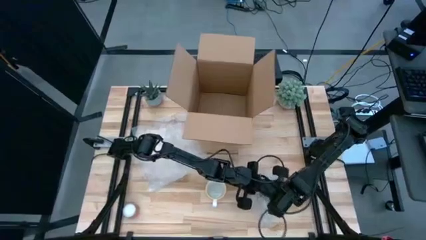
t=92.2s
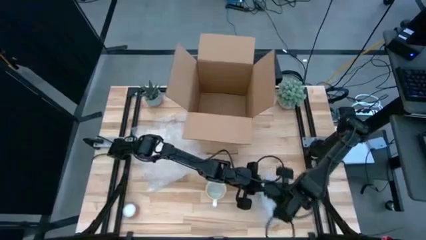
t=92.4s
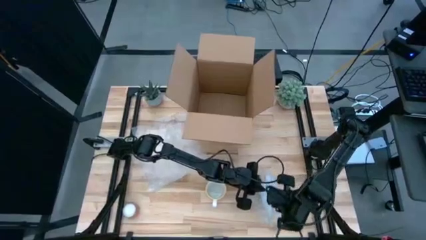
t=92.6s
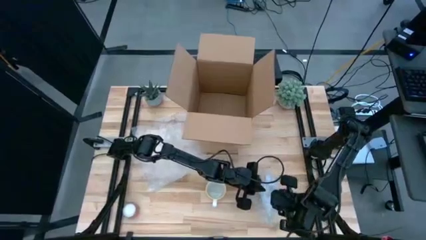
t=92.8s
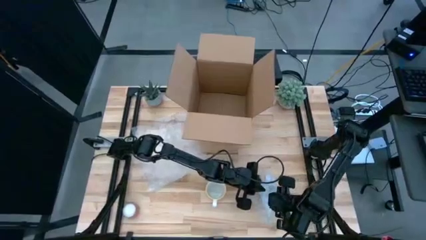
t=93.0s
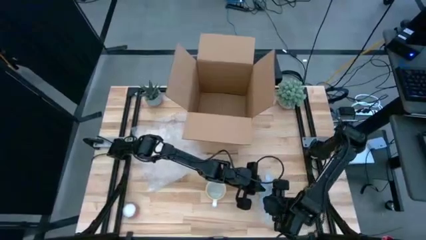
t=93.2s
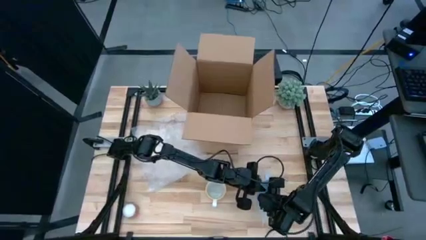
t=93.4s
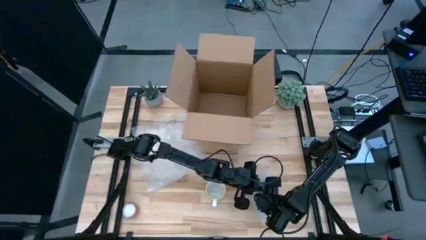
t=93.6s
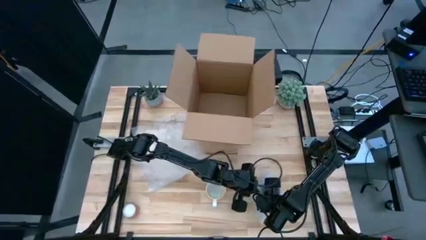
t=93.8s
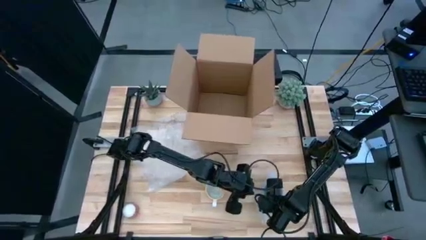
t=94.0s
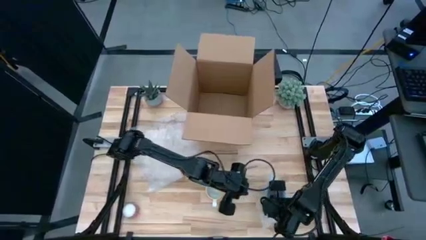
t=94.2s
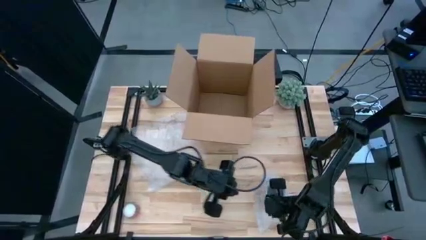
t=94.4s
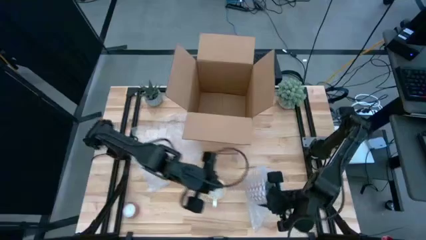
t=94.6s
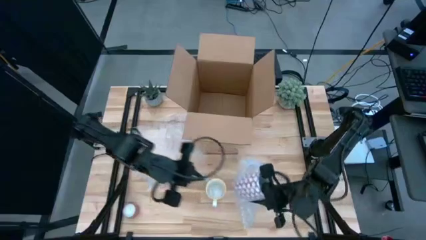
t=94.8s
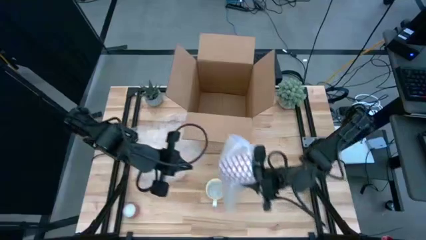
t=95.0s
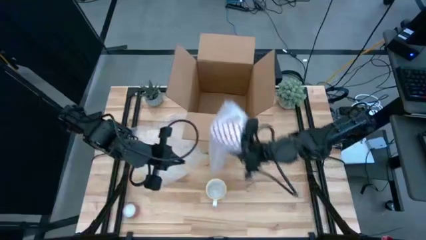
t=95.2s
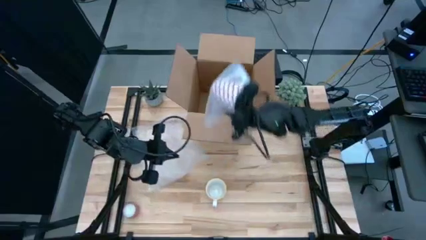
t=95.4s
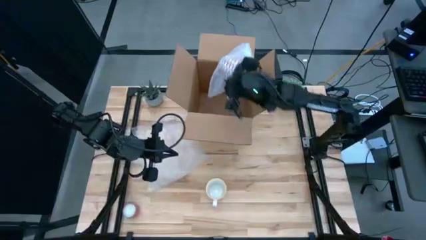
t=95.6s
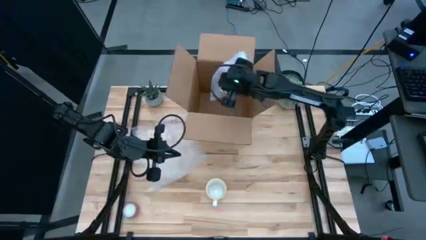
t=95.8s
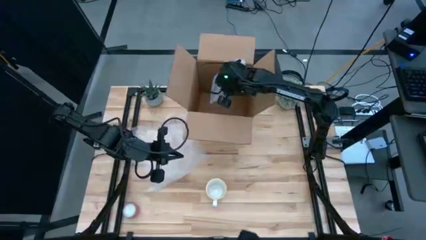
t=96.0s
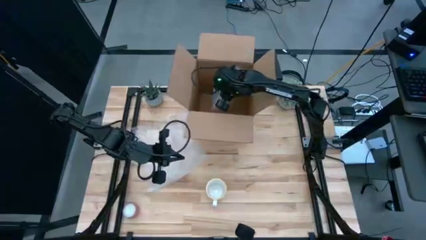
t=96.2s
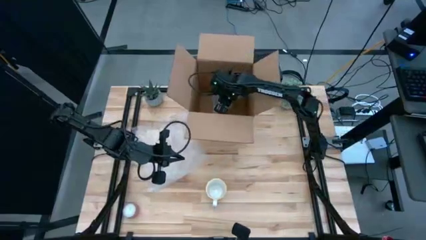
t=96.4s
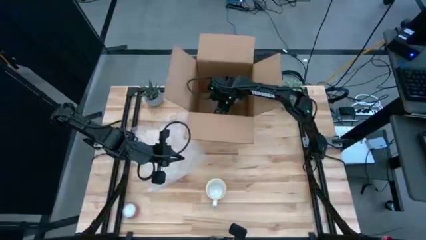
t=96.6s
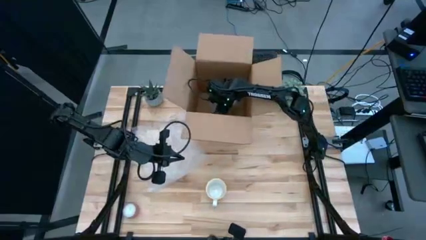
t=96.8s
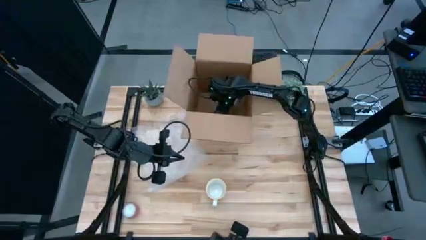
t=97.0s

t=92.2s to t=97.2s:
Task: wrap mug
Put the red wrapped cup into the box

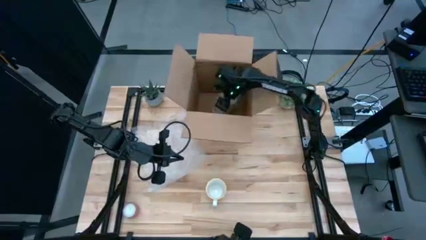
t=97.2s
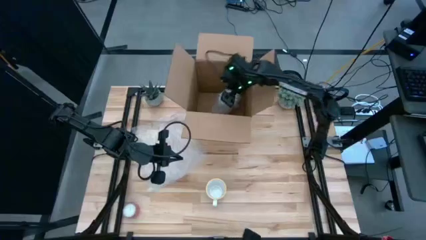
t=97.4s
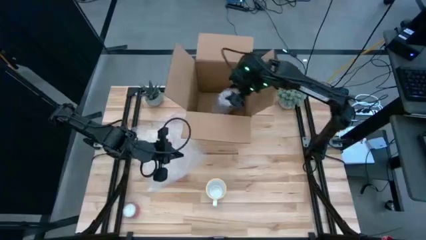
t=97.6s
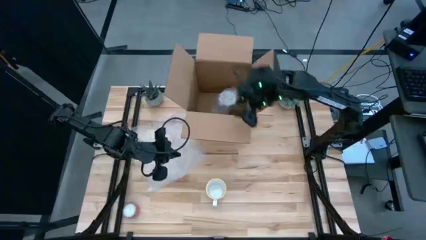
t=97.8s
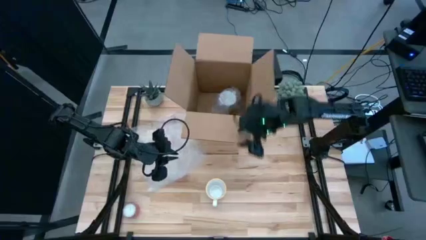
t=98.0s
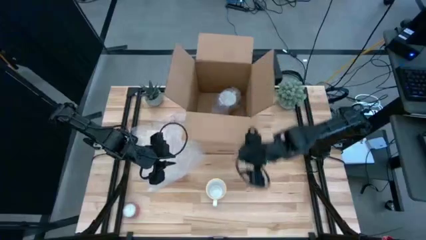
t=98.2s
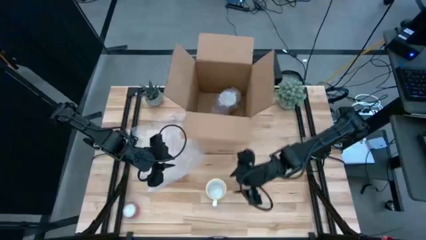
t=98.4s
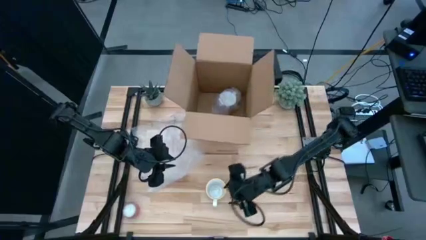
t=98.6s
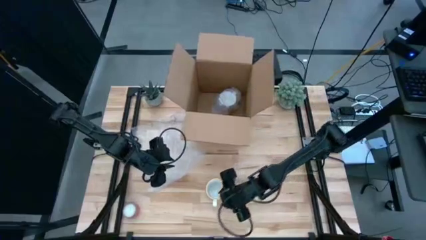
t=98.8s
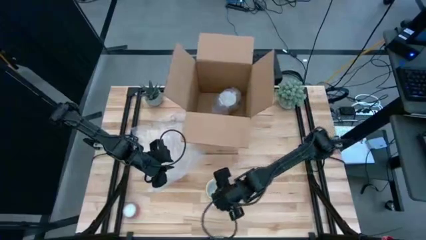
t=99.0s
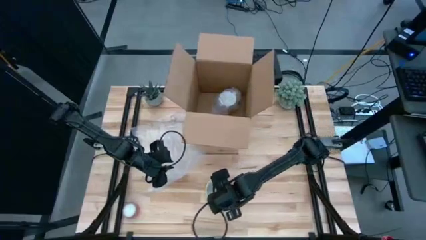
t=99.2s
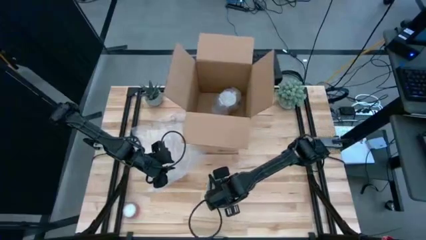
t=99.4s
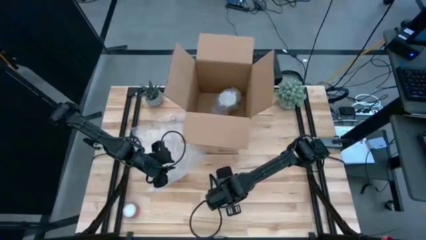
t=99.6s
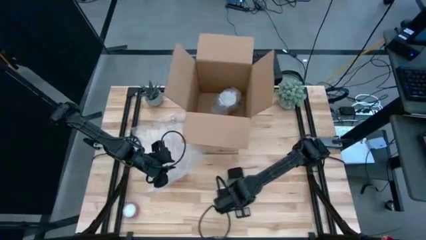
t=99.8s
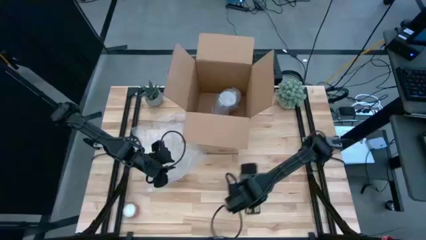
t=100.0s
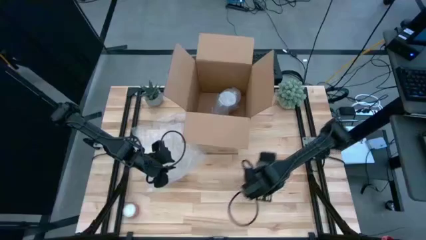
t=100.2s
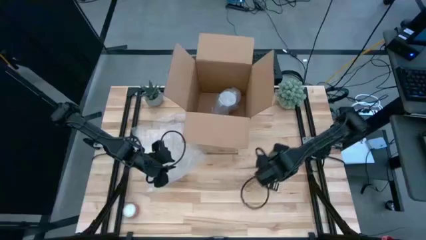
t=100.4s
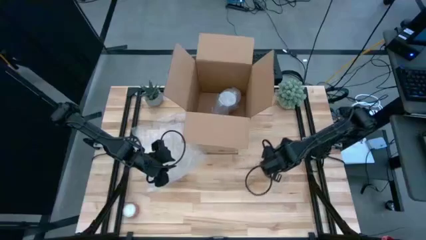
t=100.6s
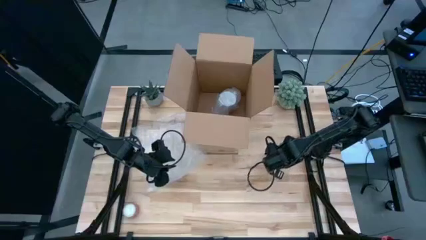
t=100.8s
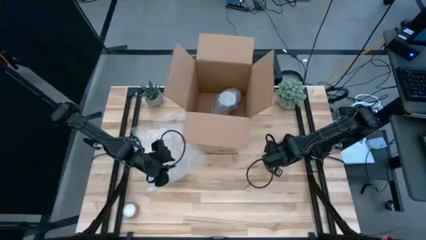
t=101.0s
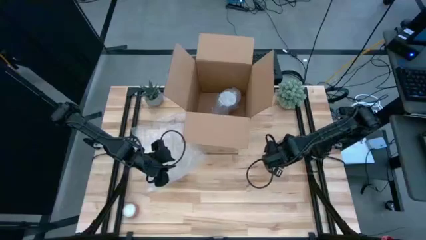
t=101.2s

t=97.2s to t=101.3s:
Move the cup to the middle right

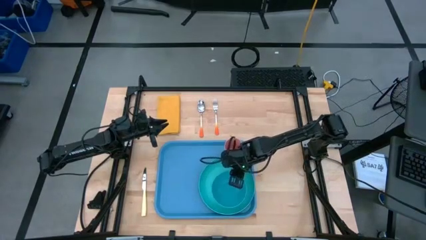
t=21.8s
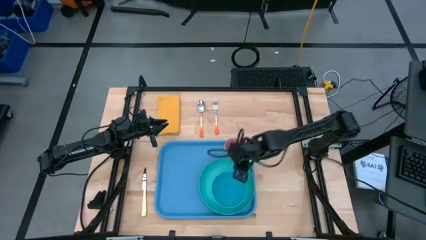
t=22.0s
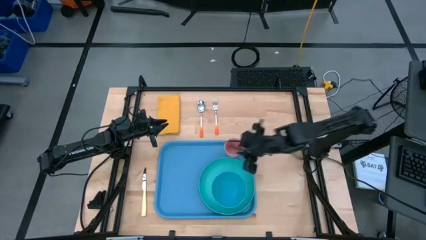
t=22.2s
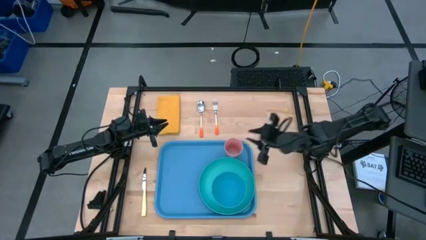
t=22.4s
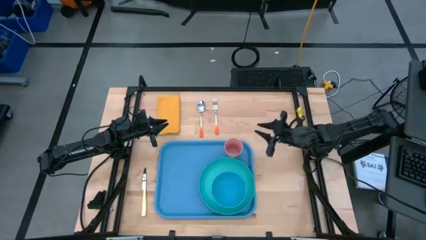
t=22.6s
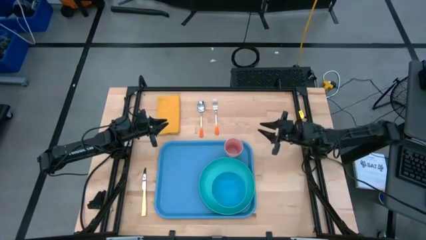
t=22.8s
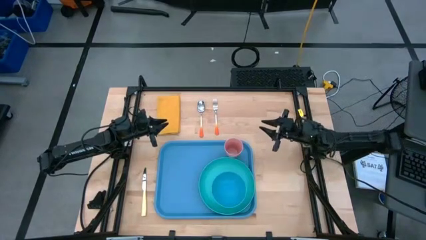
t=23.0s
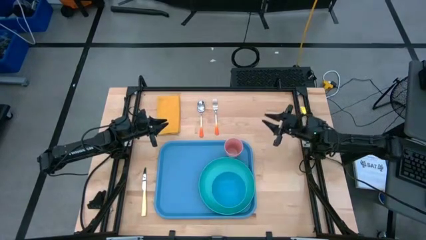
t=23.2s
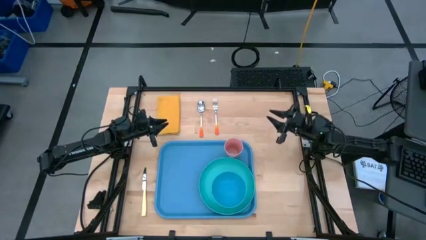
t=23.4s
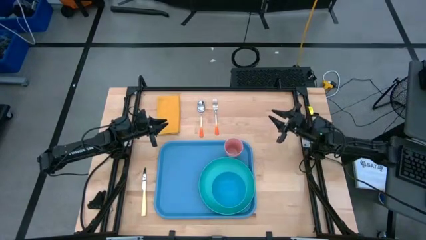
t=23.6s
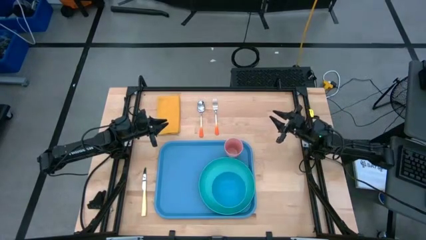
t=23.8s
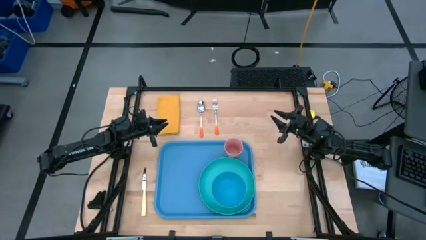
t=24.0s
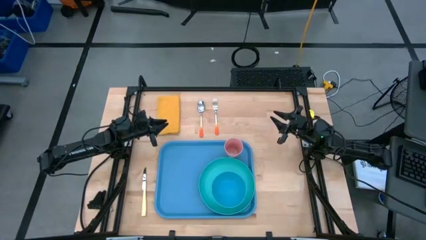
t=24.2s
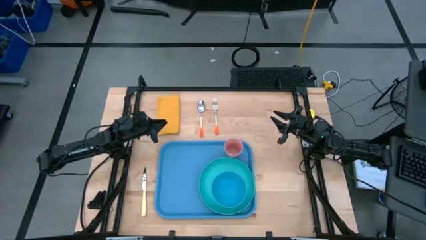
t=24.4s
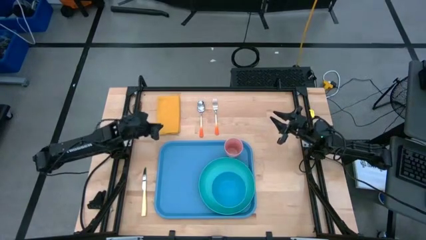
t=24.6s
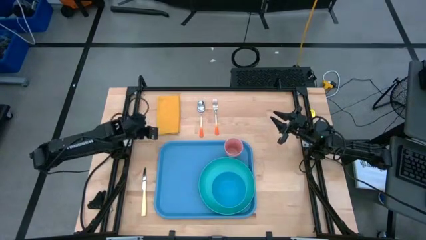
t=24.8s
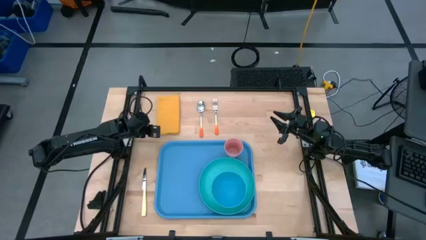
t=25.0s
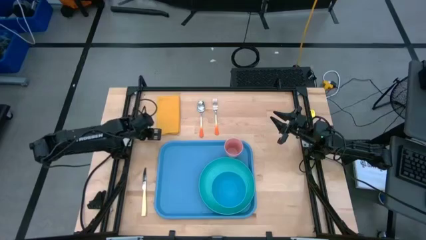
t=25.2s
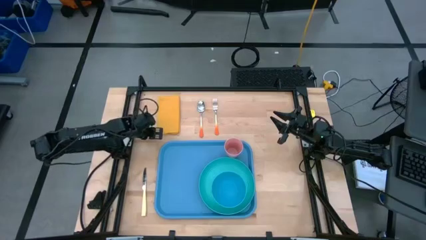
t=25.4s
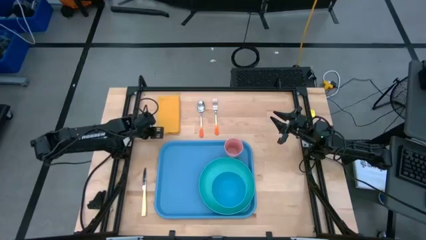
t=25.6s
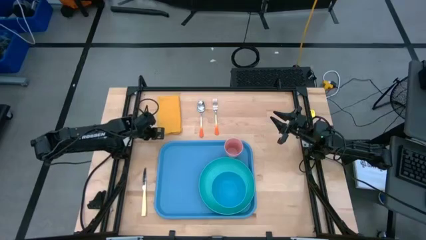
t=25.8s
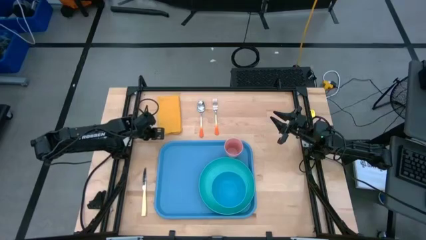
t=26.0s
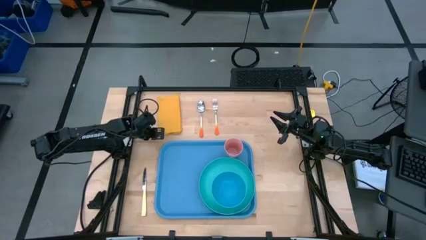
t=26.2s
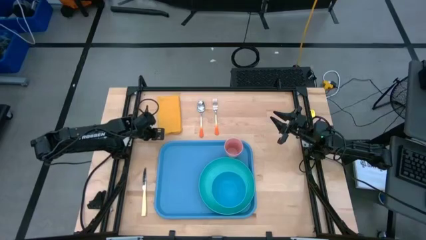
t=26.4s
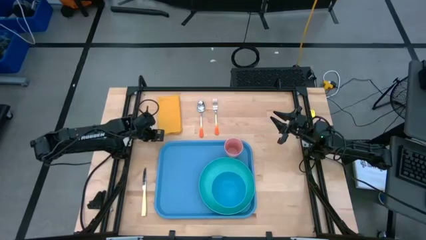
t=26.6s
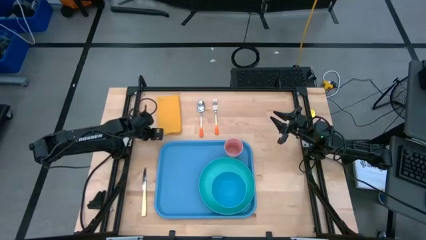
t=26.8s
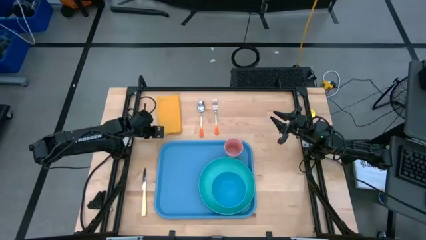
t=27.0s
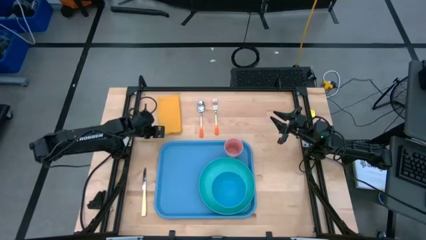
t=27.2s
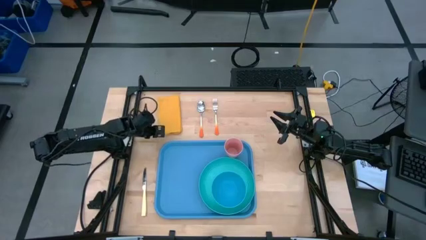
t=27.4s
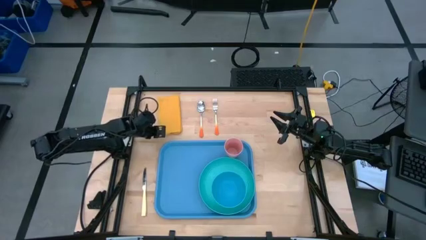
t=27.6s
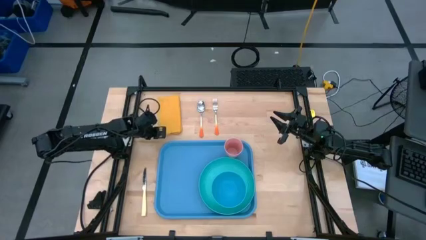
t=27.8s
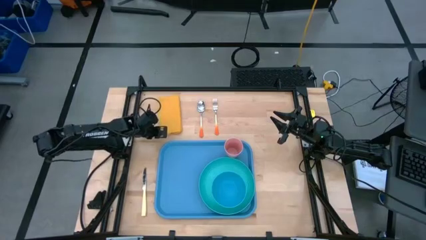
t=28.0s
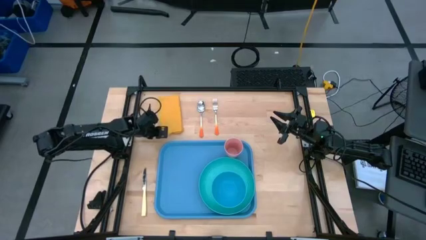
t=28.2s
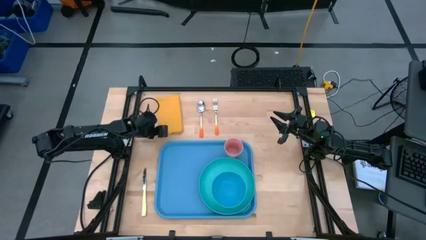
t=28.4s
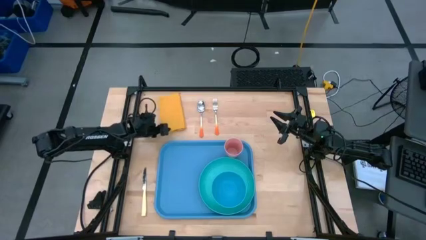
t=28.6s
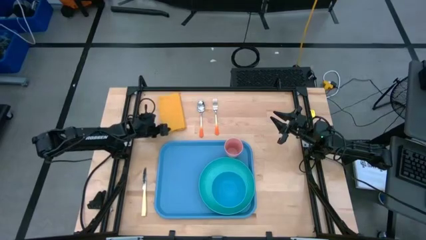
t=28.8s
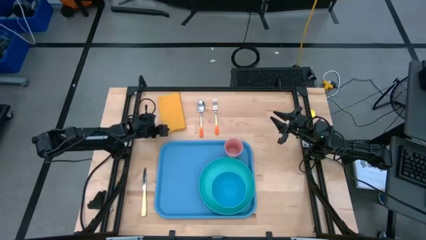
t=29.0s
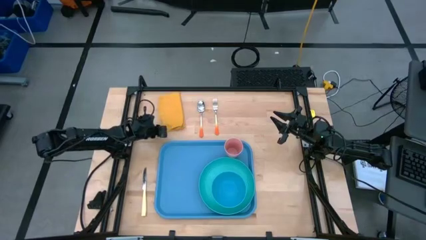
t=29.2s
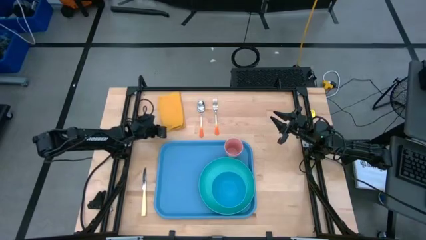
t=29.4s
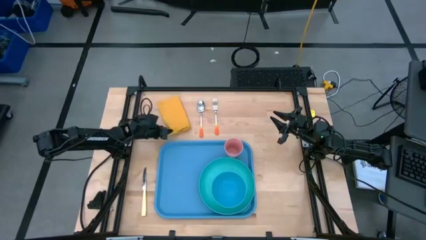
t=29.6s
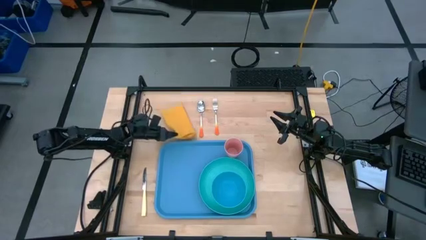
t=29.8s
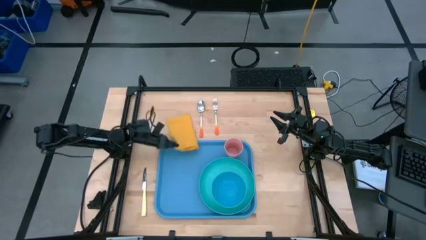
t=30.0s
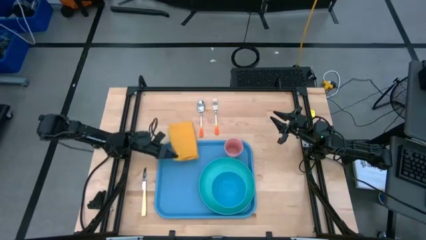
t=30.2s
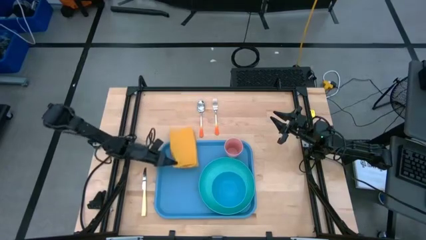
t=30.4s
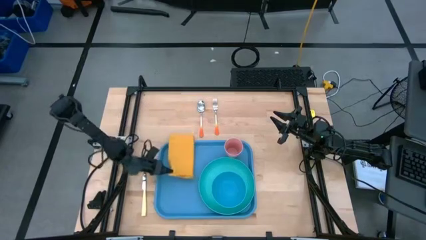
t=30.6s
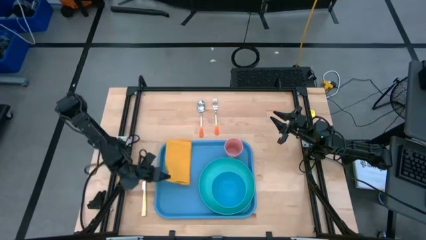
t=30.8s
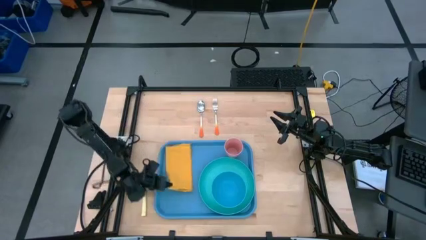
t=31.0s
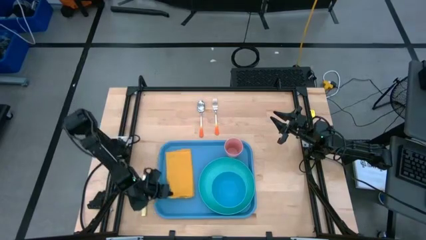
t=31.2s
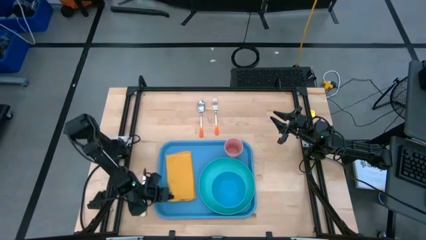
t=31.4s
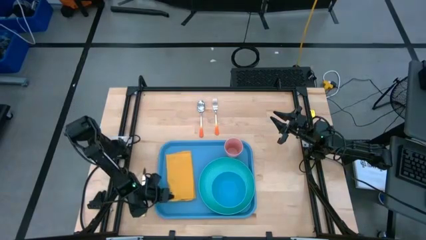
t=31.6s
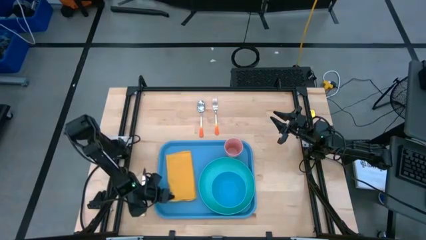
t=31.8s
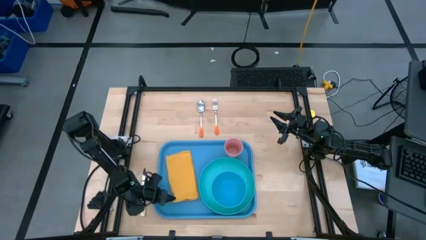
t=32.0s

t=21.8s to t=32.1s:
Task: Set up tray
Put the yellow napkin on the blue tray
